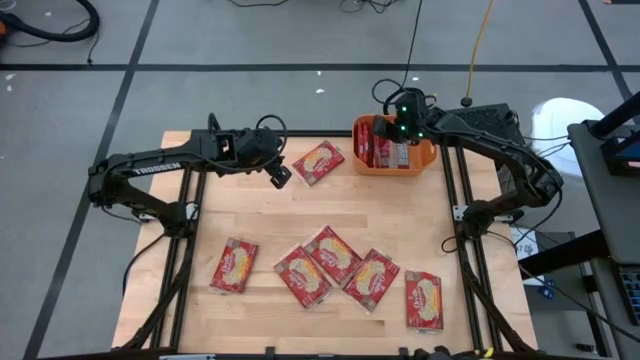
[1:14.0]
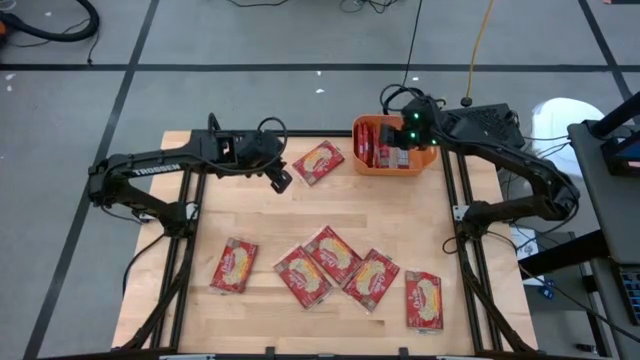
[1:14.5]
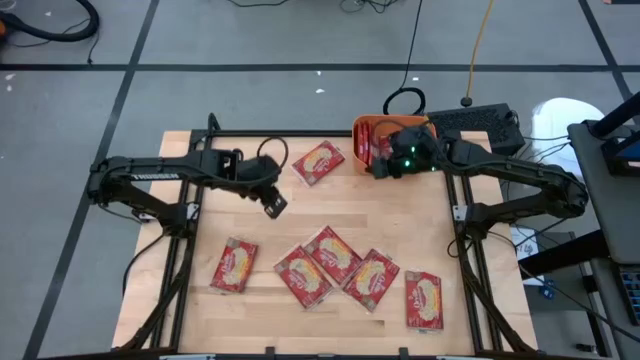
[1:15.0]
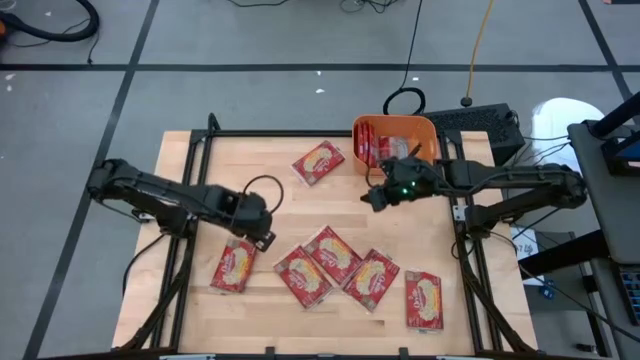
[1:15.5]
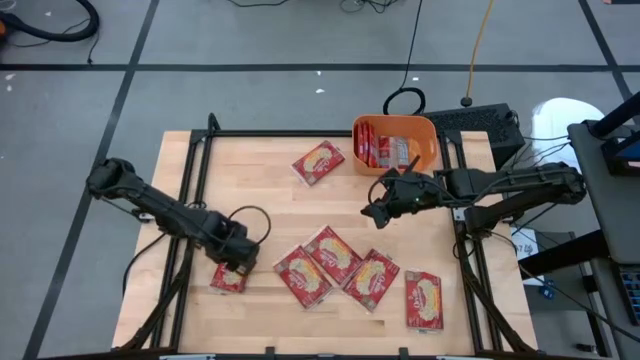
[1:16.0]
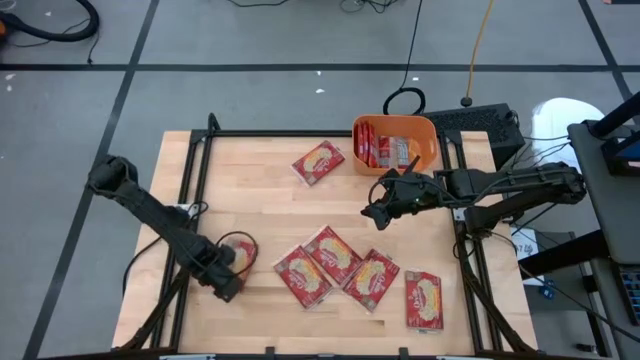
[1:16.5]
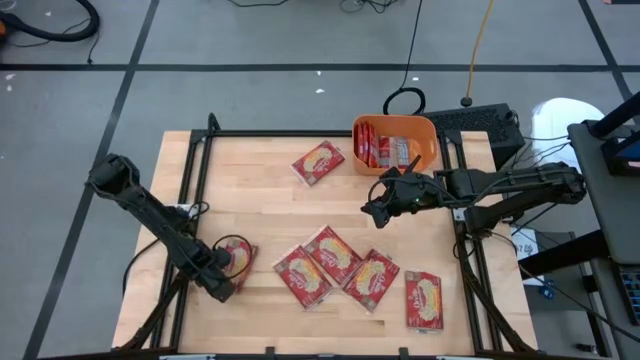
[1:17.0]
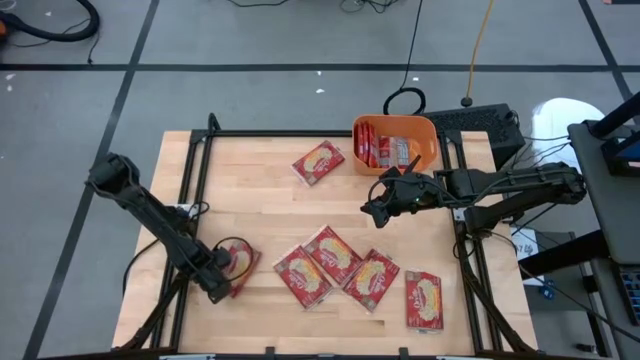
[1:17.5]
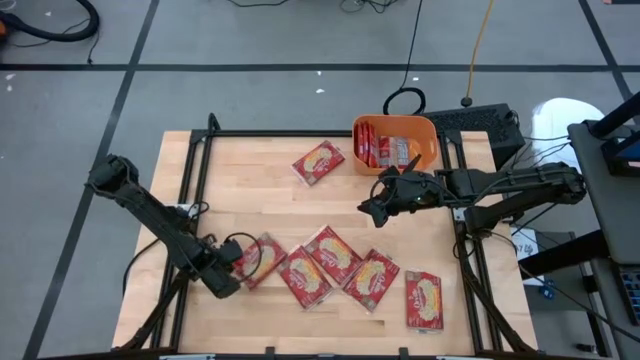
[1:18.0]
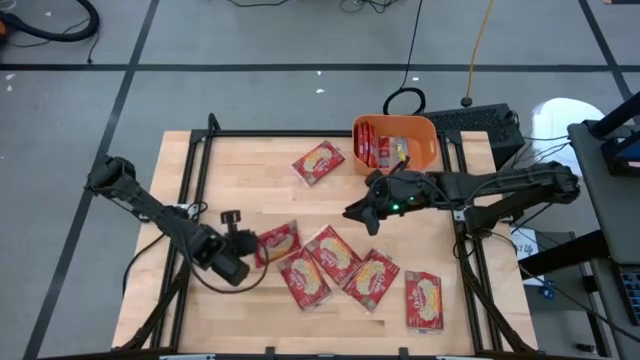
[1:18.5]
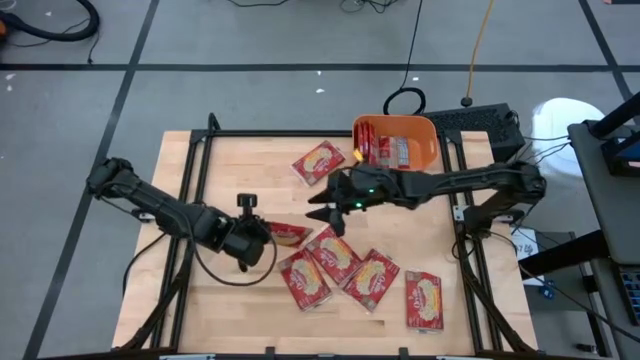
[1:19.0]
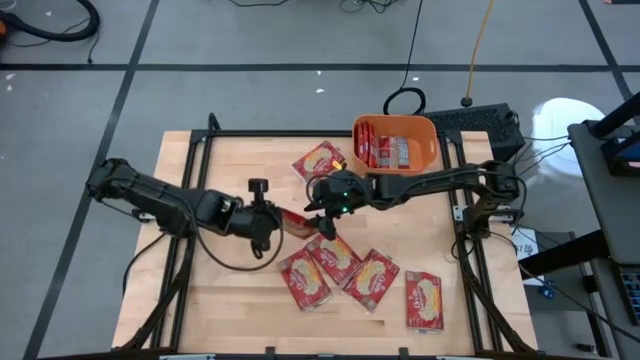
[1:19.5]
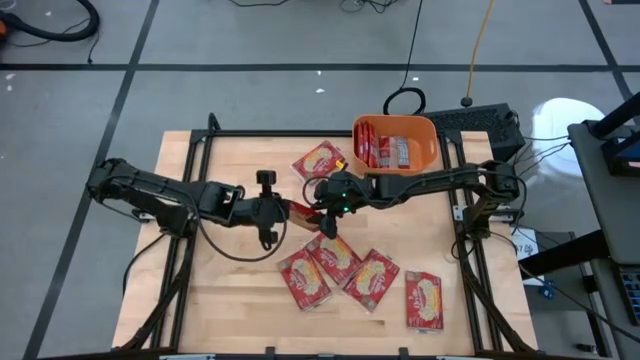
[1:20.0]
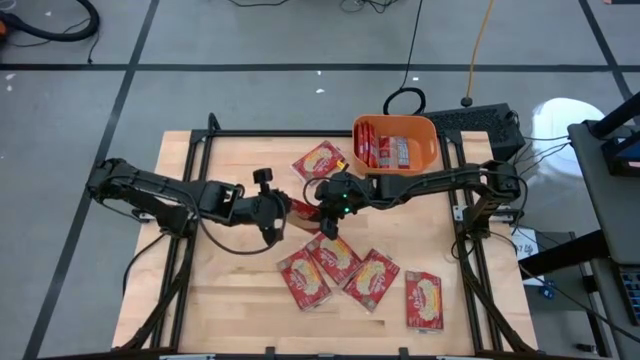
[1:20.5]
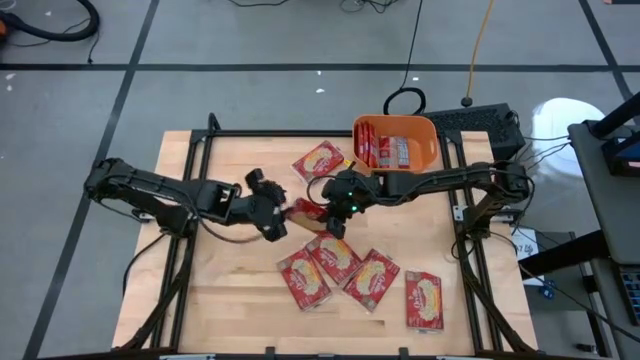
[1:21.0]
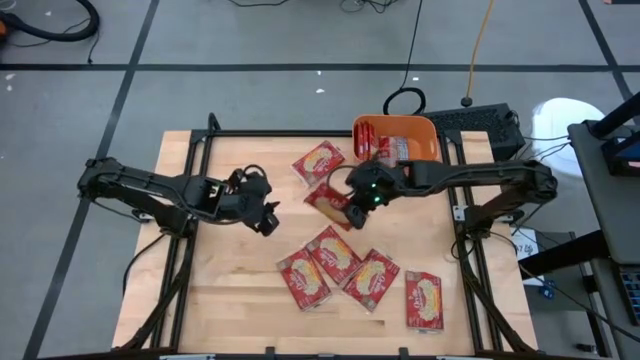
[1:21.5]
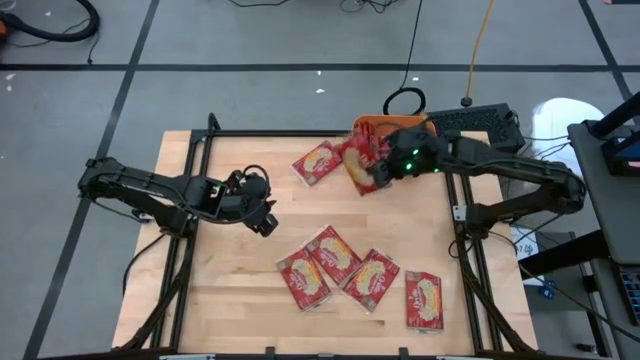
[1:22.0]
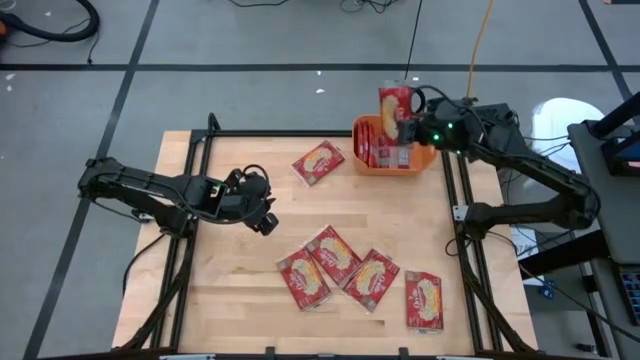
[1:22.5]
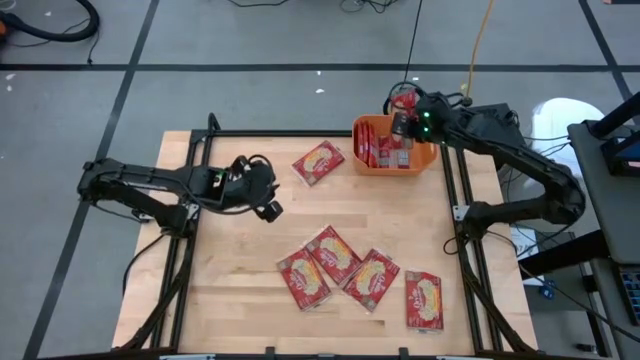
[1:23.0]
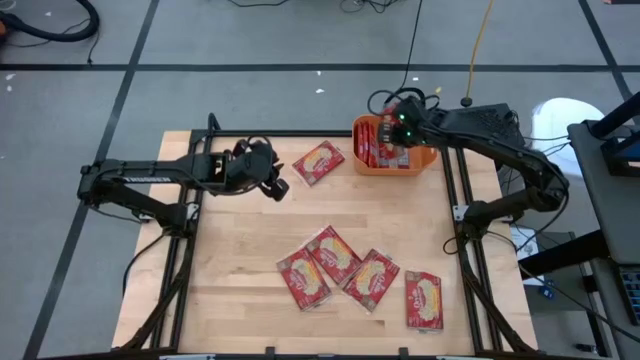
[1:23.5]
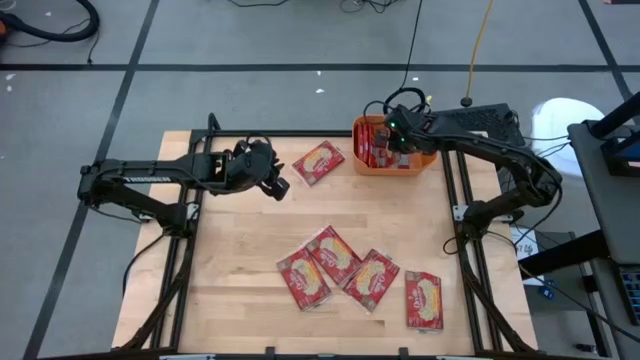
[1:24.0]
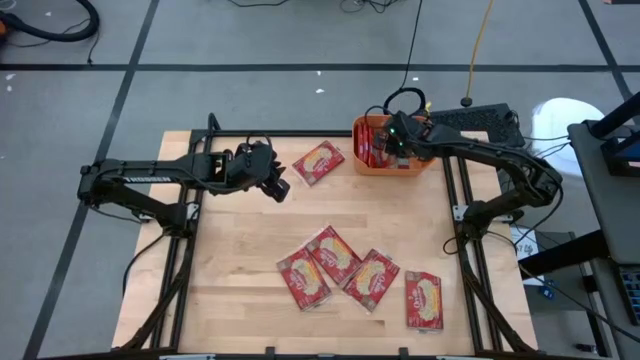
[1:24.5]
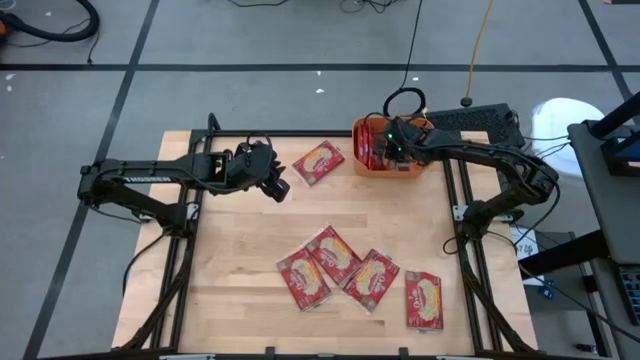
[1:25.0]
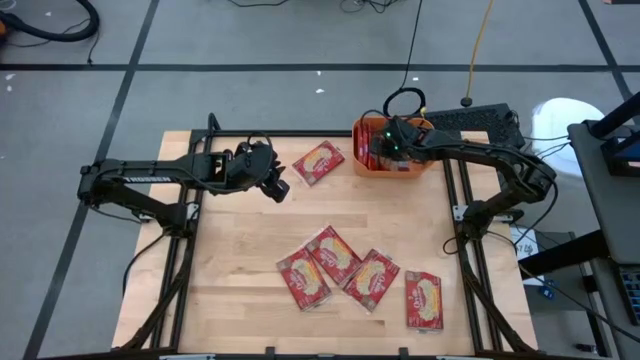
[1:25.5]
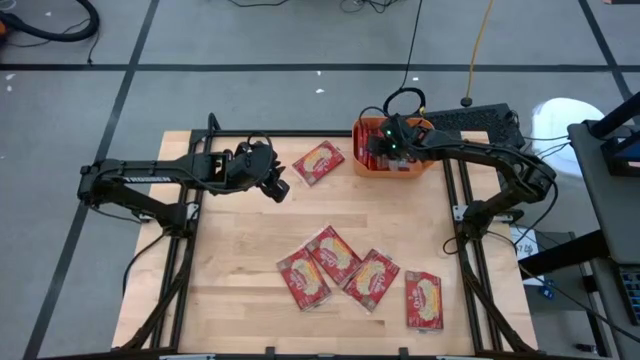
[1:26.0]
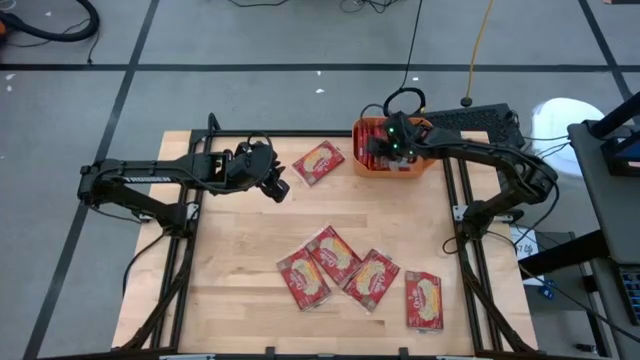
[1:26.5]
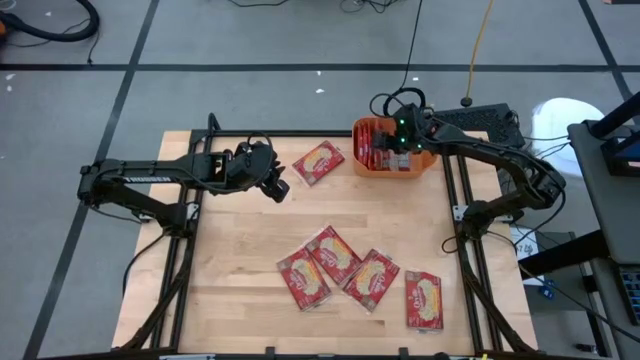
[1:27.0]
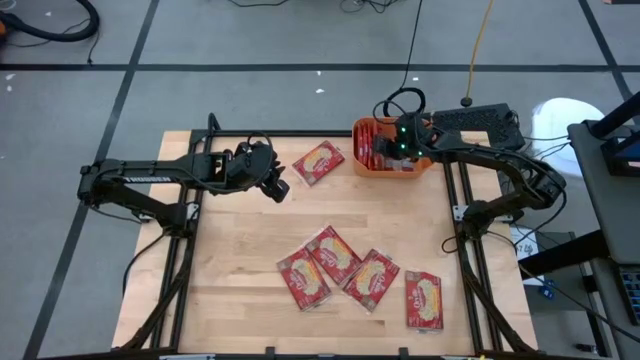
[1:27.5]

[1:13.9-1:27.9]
Task: Sort popcorn bags into baskets
Put the red popcorn bag into the orange bin

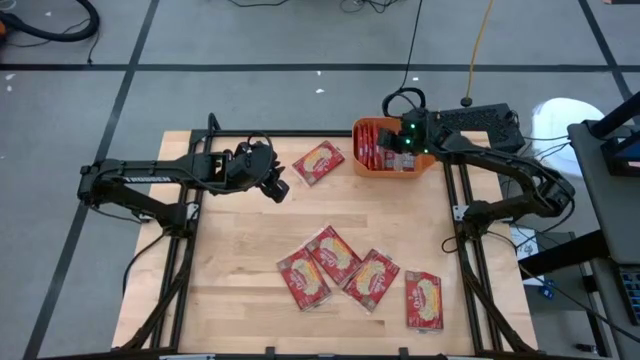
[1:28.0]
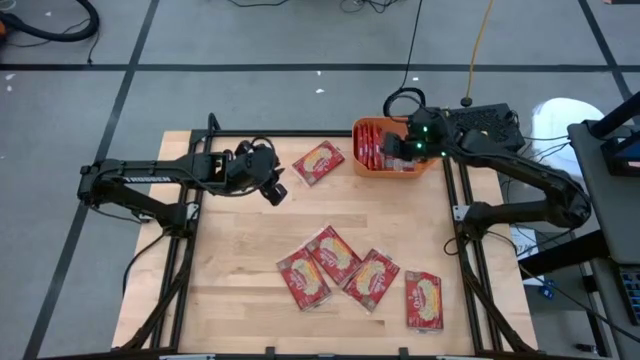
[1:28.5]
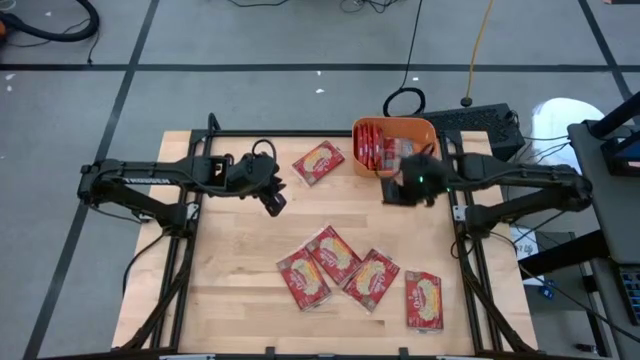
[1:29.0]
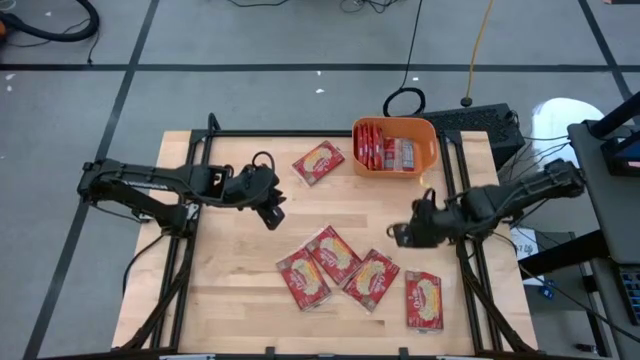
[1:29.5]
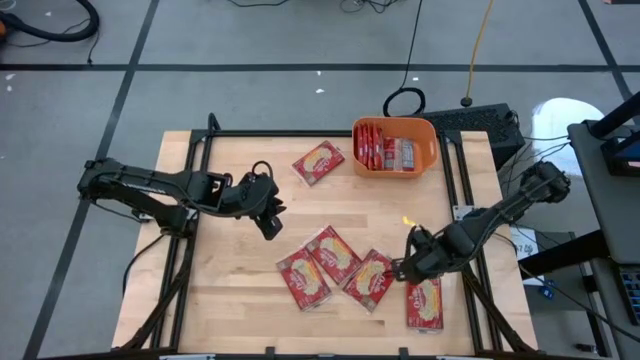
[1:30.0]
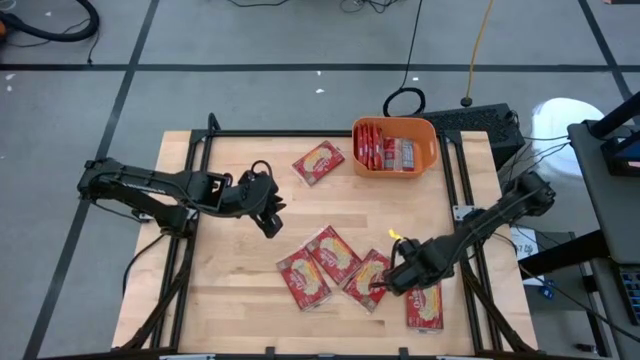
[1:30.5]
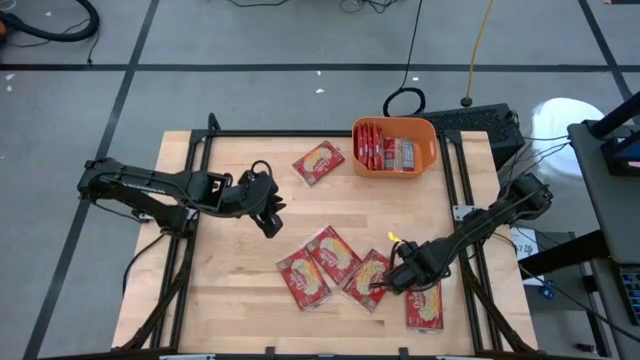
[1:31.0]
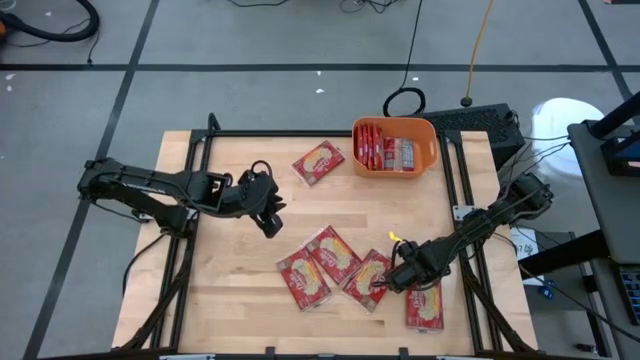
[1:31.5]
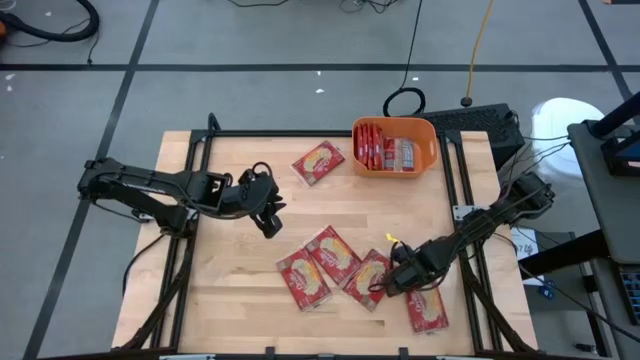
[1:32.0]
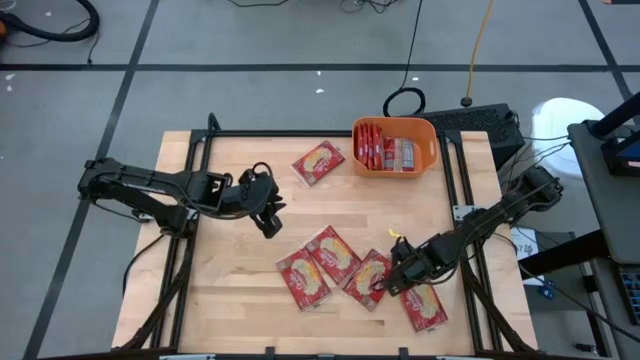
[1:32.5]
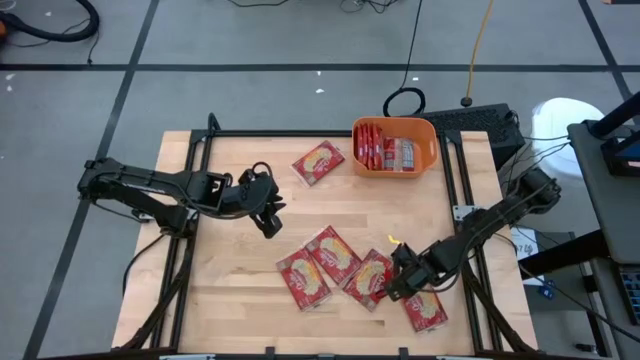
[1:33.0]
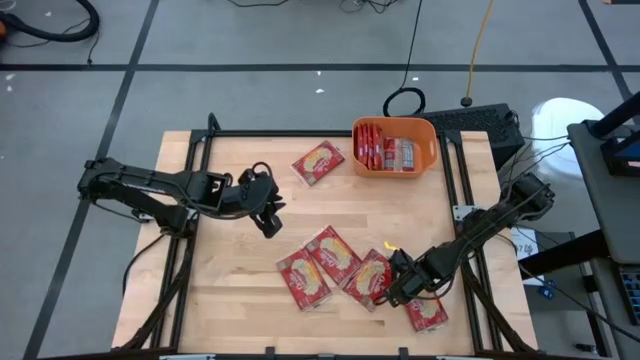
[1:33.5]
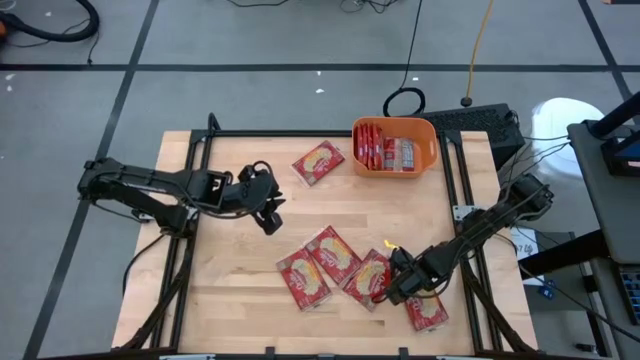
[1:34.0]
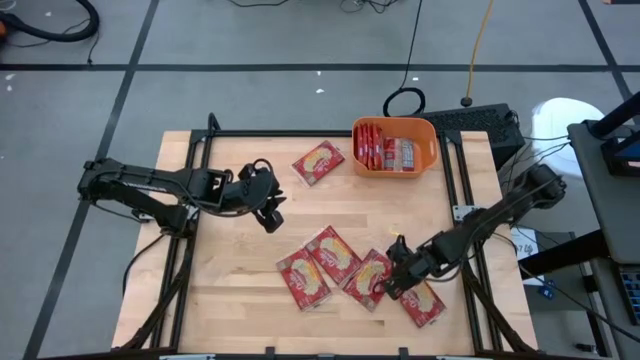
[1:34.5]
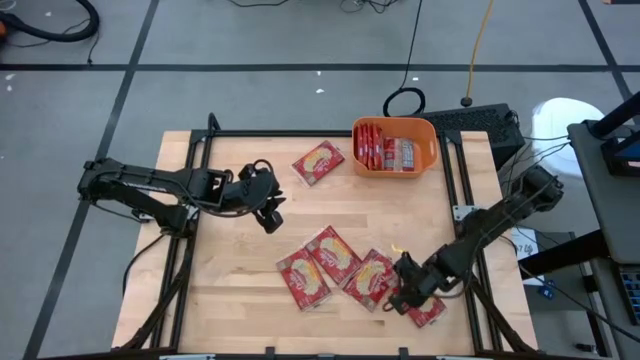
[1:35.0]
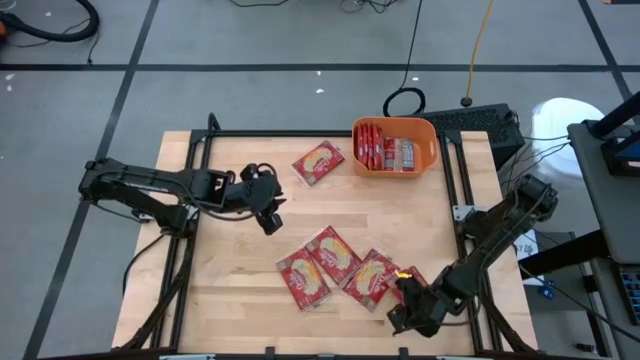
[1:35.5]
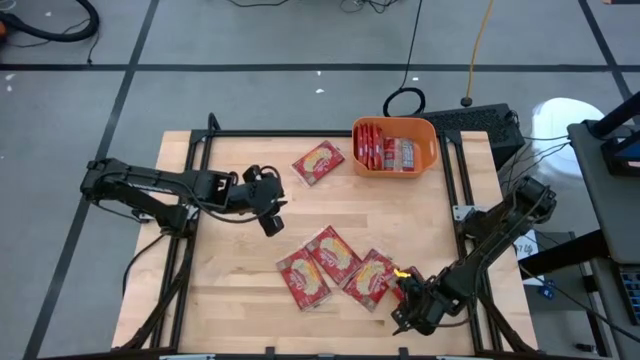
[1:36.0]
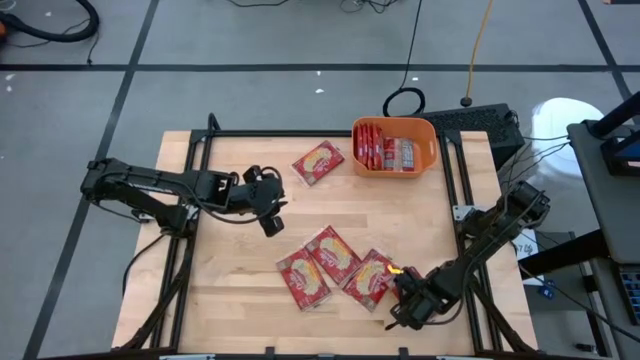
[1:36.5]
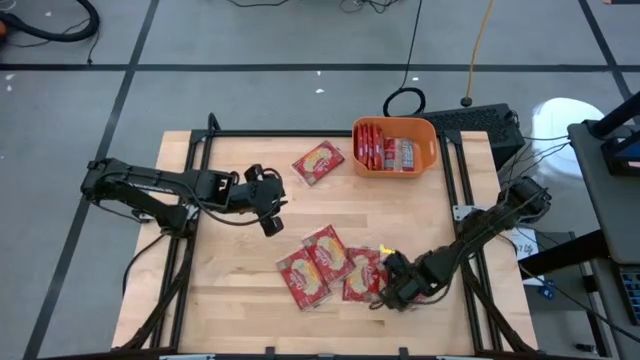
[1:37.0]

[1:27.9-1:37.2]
Put the red popcorn bag into the orange bin
